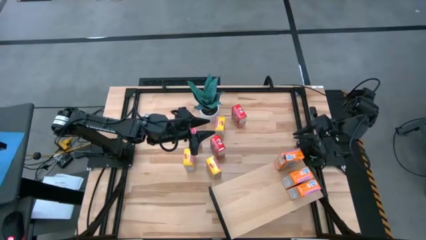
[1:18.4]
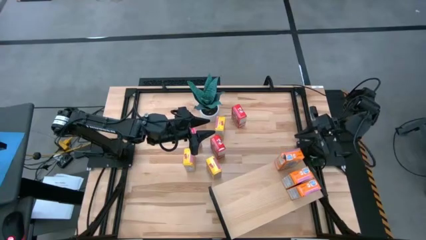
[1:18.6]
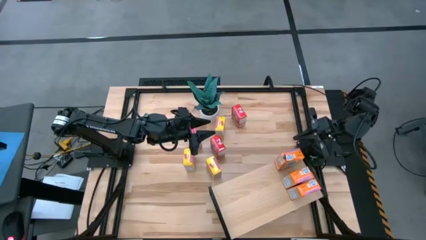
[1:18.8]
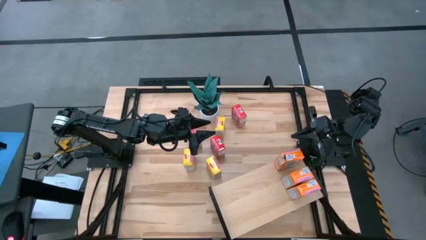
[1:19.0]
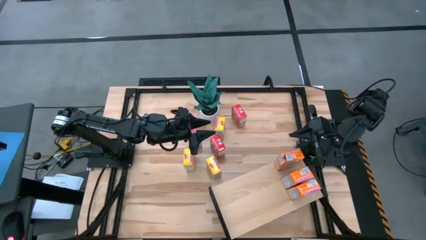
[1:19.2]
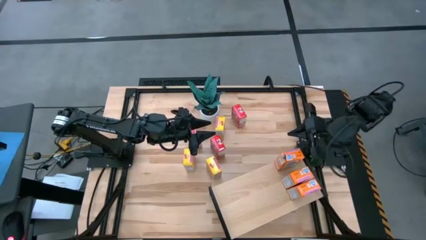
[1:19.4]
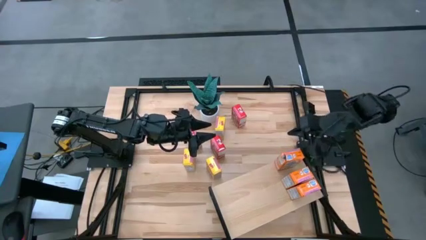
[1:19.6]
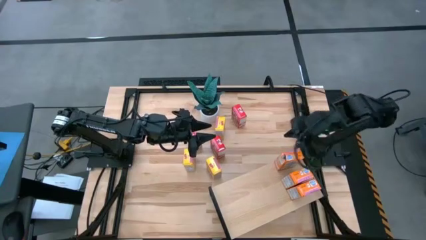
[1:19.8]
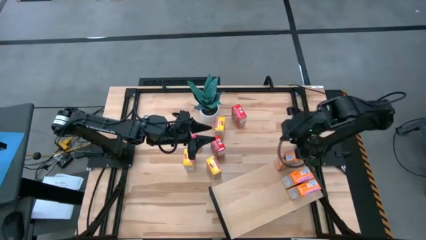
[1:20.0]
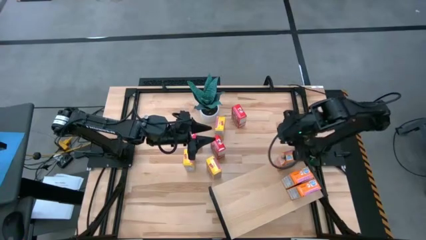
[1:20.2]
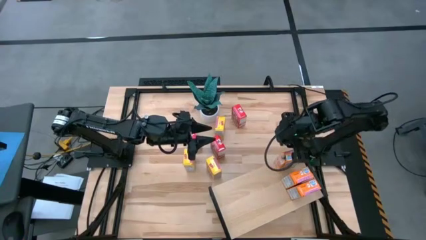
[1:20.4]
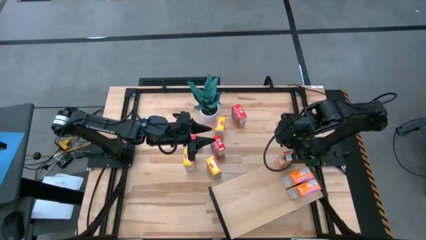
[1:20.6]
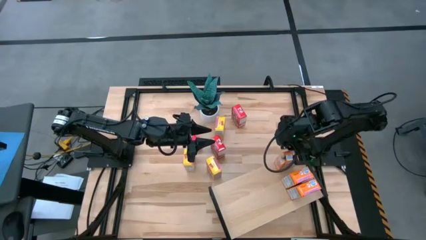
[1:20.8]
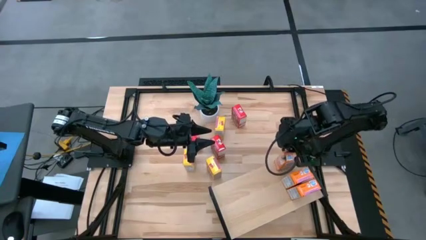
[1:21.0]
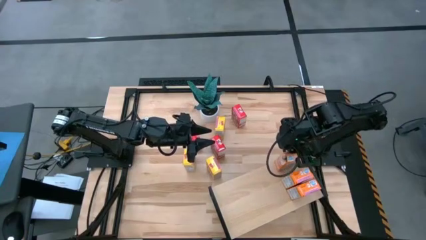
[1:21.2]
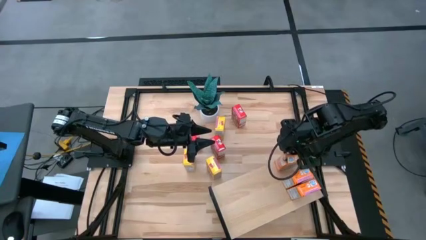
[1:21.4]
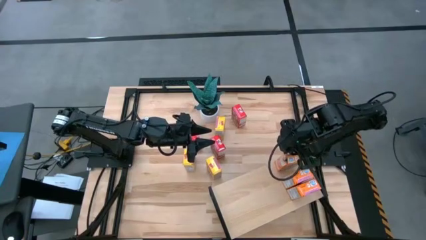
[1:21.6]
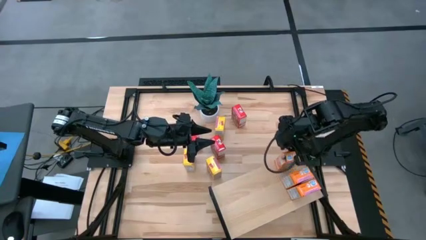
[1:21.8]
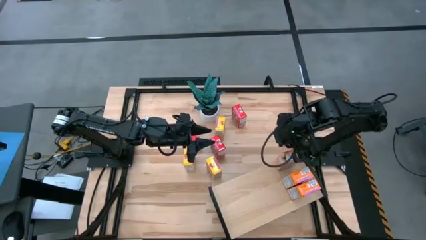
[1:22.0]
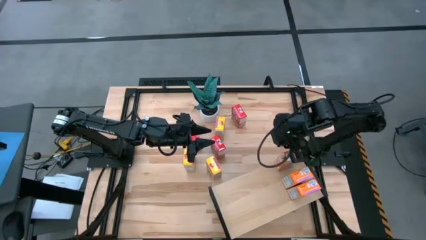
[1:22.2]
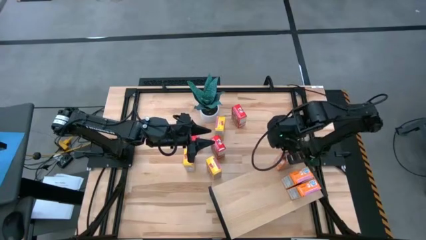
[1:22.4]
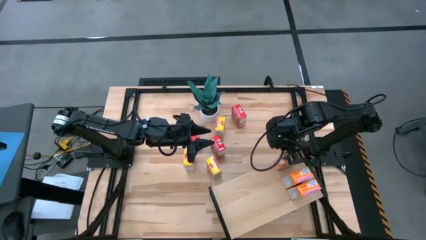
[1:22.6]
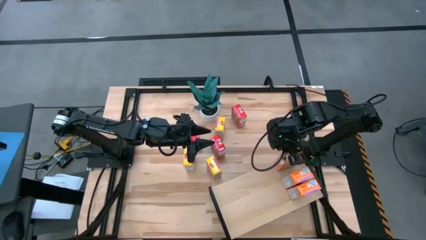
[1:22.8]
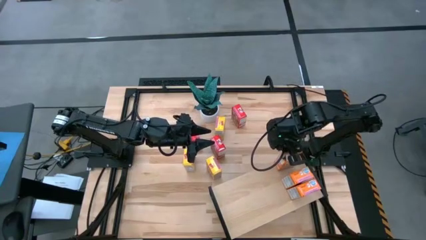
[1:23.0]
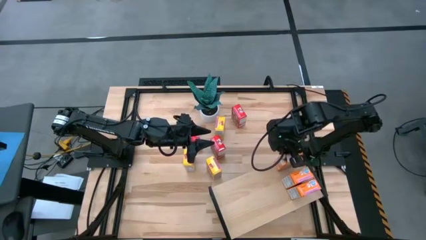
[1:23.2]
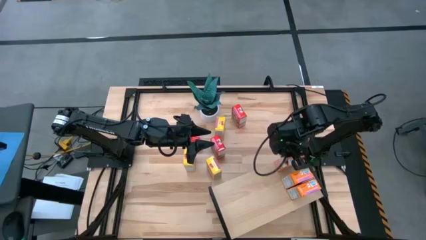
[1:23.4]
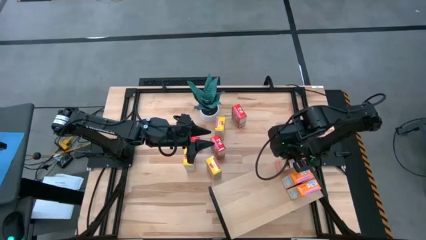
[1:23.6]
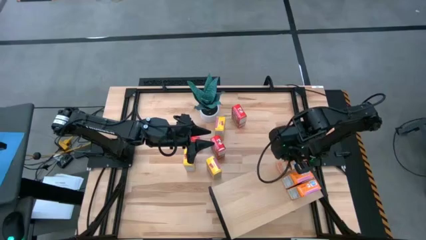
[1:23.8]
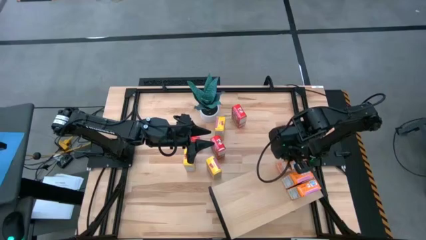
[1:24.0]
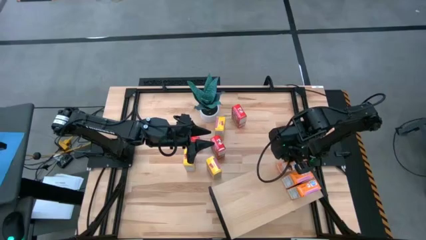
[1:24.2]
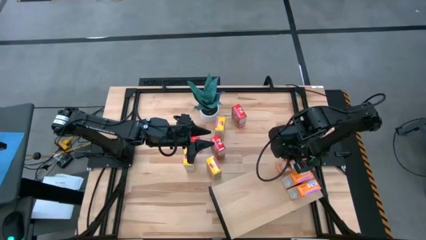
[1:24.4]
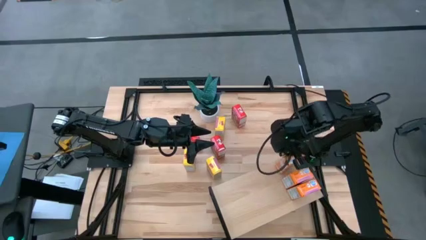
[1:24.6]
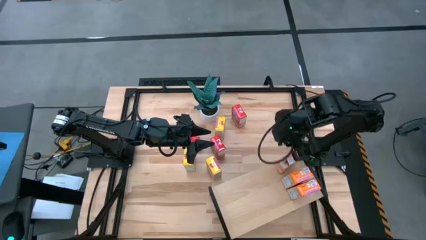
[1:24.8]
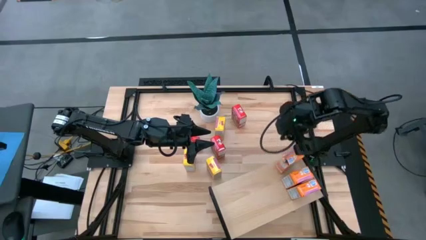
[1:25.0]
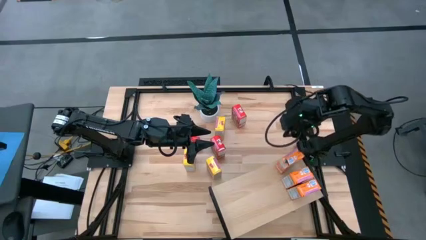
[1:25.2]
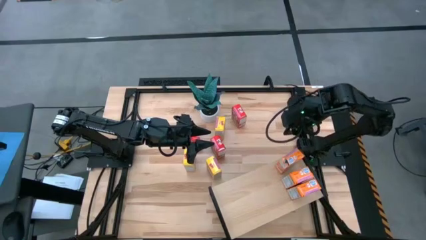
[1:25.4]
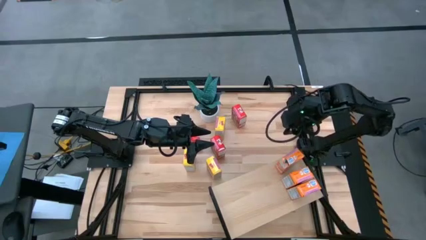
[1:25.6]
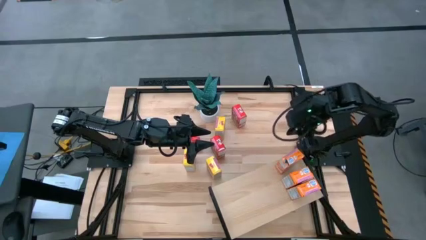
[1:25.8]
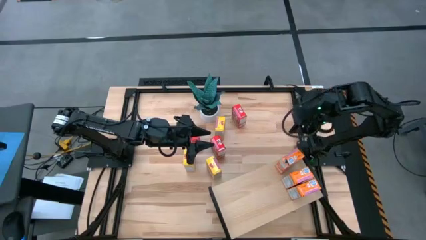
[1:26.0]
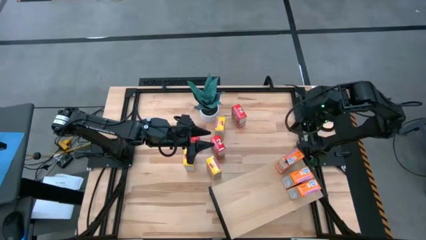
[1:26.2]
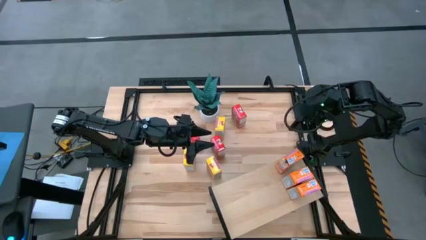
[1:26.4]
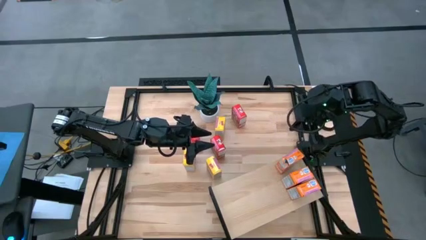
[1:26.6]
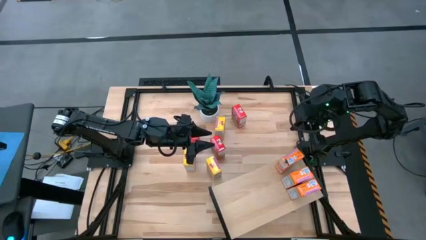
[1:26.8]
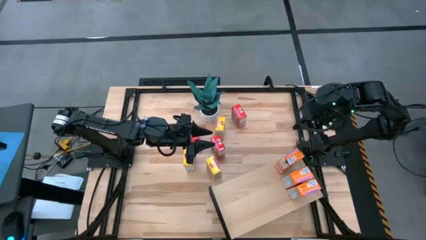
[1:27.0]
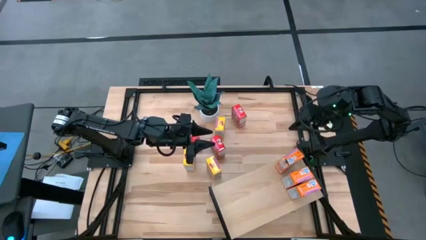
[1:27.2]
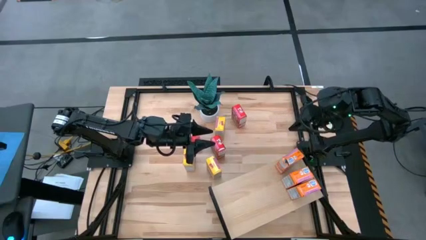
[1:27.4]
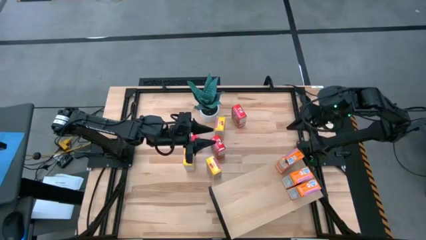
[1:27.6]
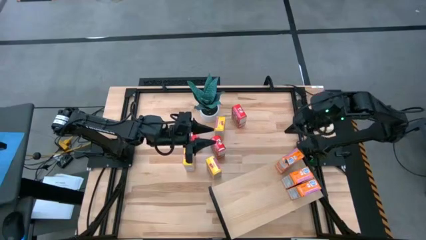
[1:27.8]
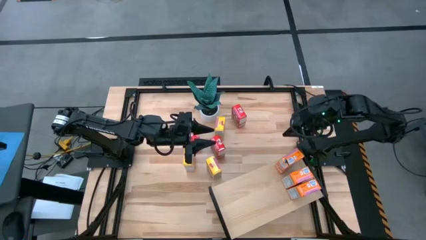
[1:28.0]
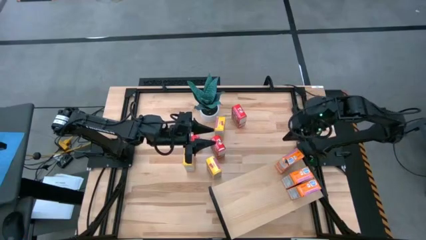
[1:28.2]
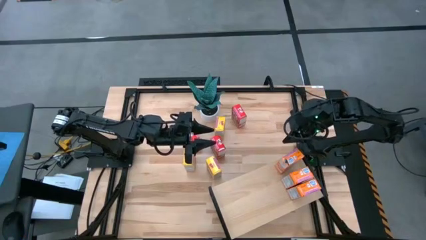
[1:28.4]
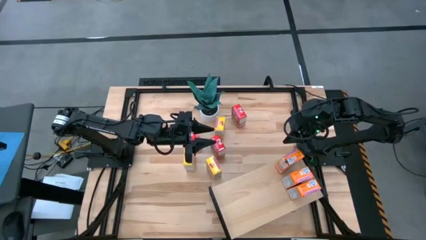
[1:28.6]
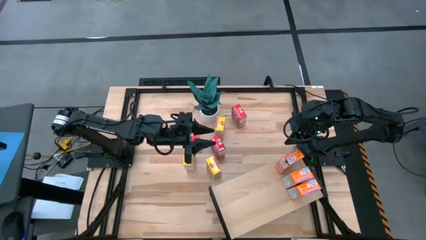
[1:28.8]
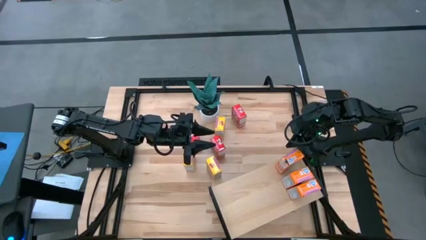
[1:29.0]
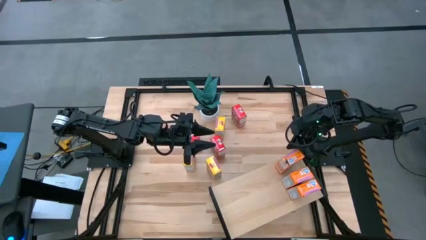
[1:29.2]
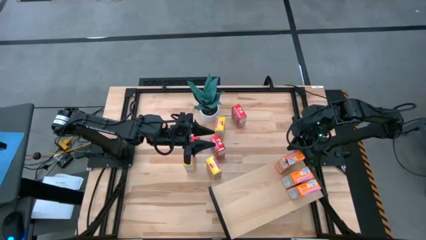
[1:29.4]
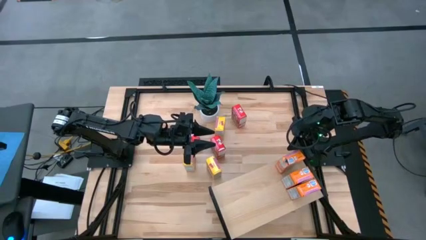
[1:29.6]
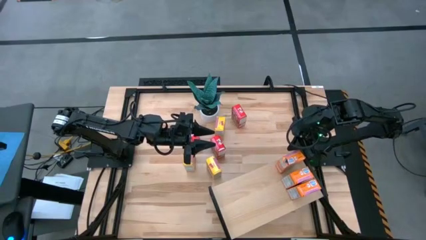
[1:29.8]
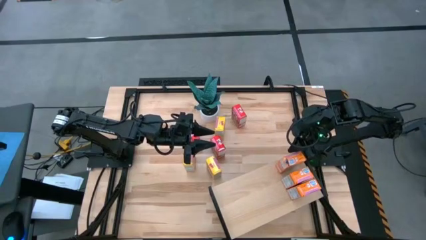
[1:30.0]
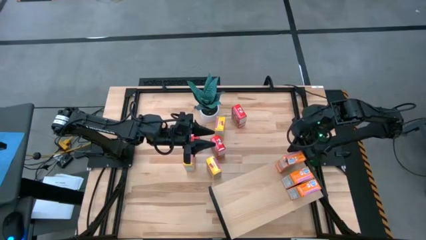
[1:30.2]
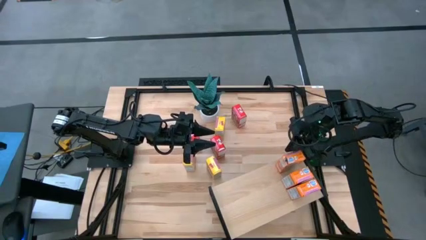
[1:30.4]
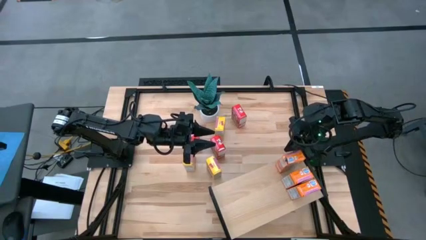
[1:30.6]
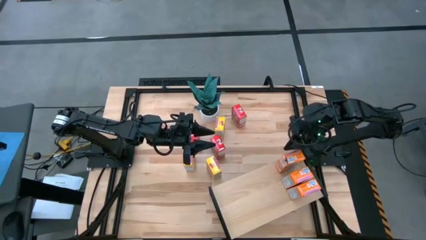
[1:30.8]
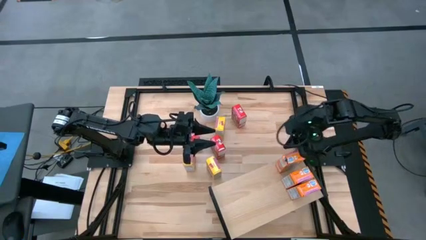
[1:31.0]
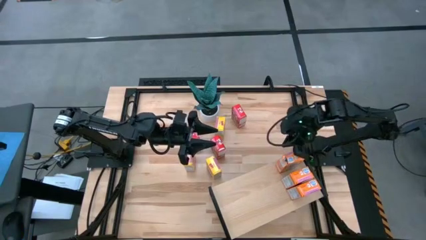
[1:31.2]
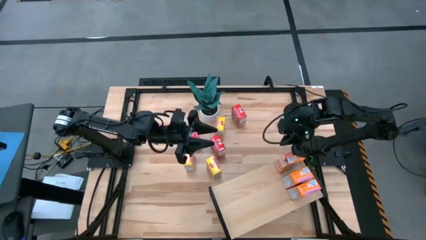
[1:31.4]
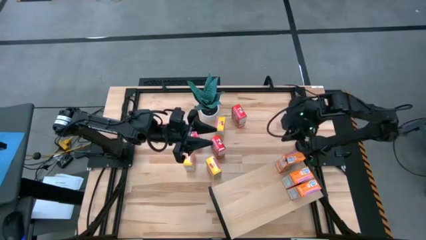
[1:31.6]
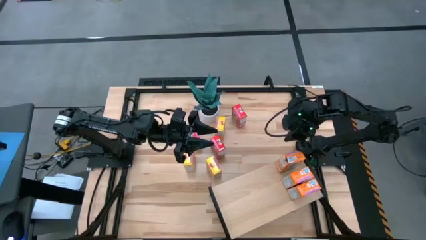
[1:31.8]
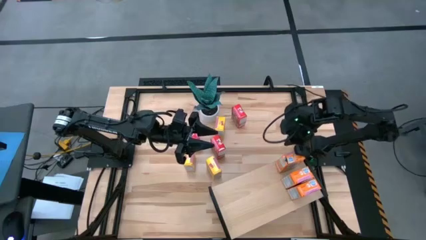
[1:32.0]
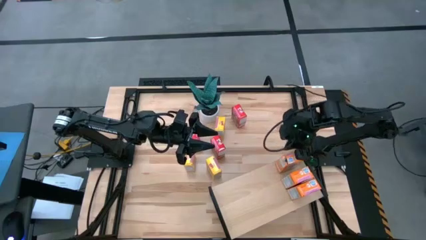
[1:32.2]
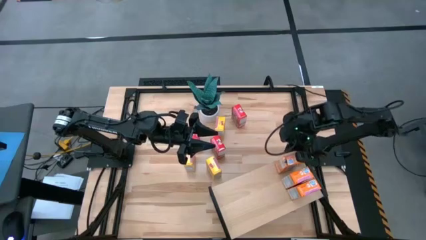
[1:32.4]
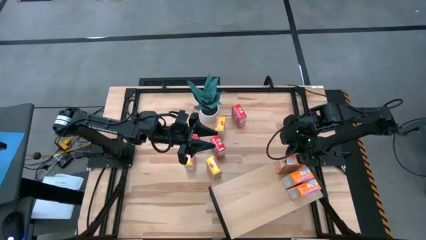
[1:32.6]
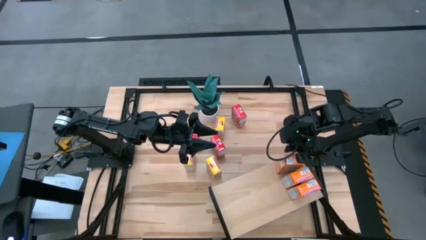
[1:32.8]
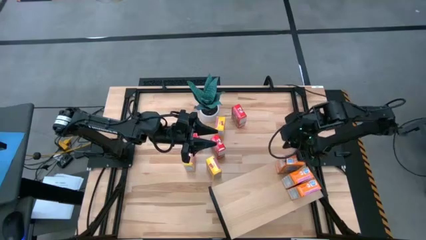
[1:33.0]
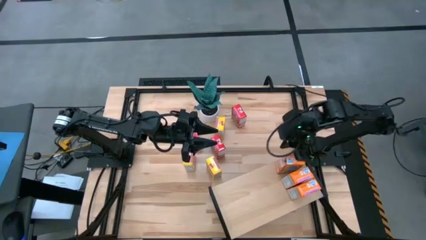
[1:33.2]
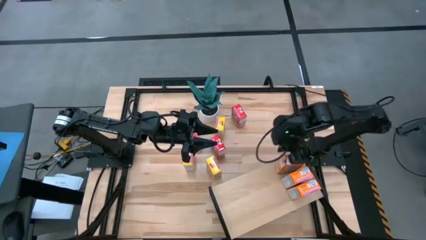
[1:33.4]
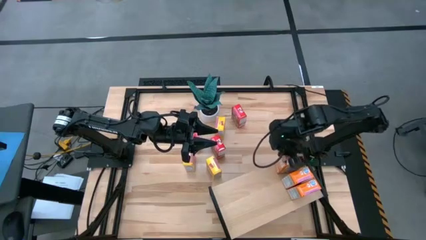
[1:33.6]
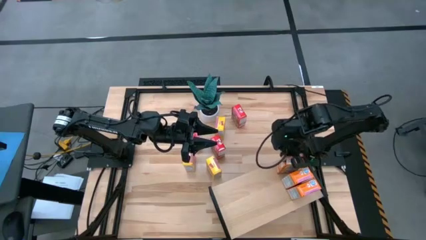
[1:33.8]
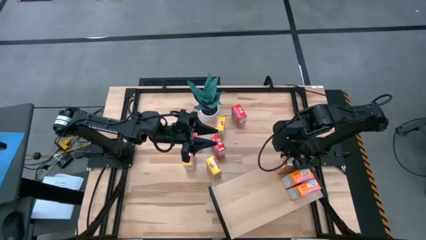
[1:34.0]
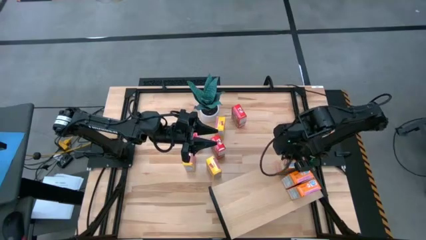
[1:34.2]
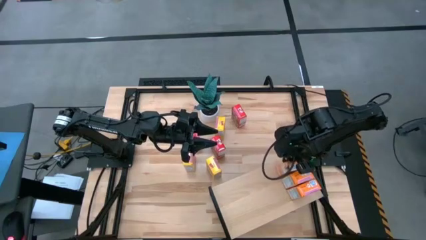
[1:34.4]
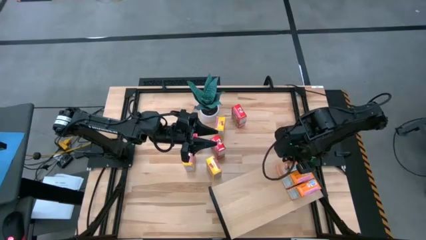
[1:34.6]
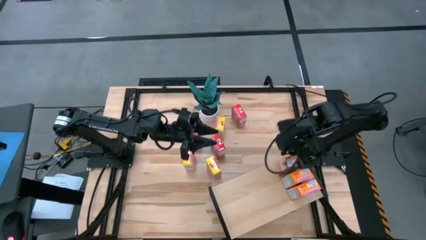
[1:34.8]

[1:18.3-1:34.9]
Task: Stack cereal on shelf
Put the orange cereal box on the shelf aligned with the other orange cereal boxes
